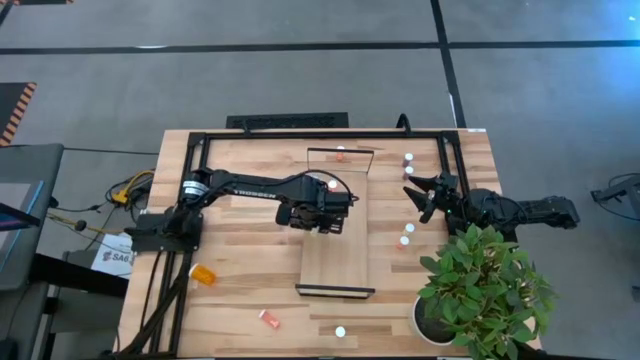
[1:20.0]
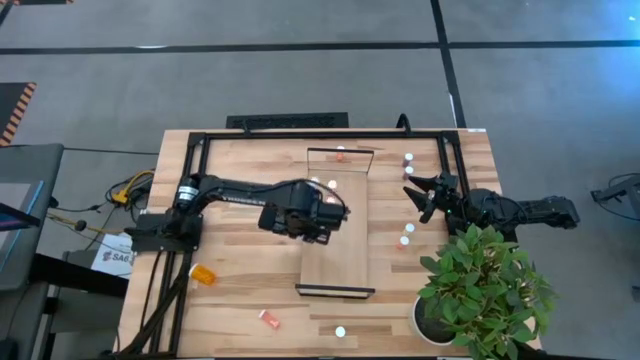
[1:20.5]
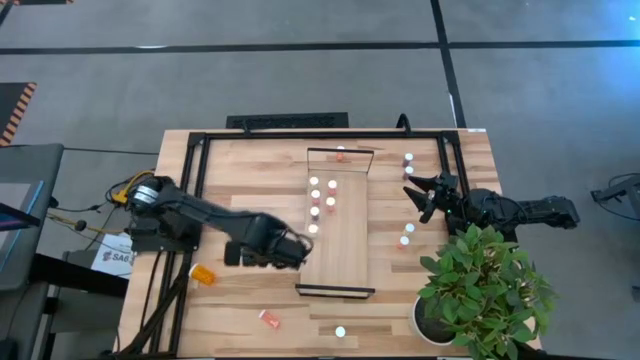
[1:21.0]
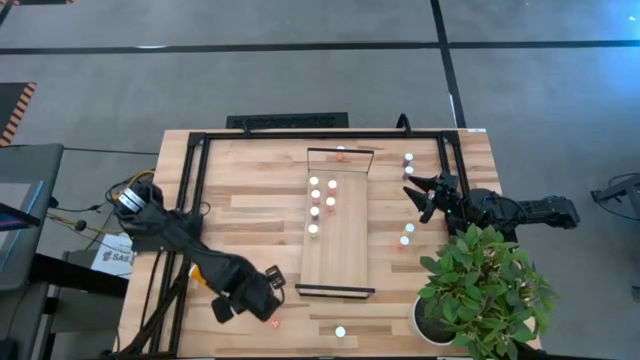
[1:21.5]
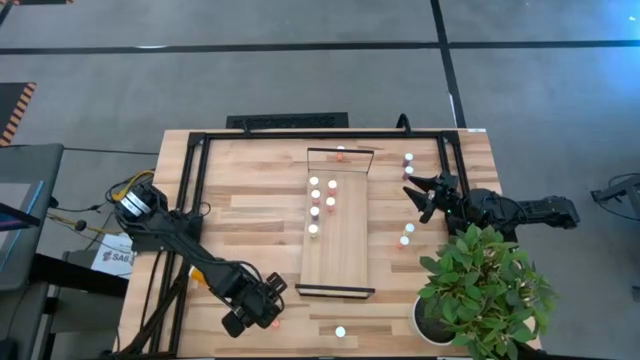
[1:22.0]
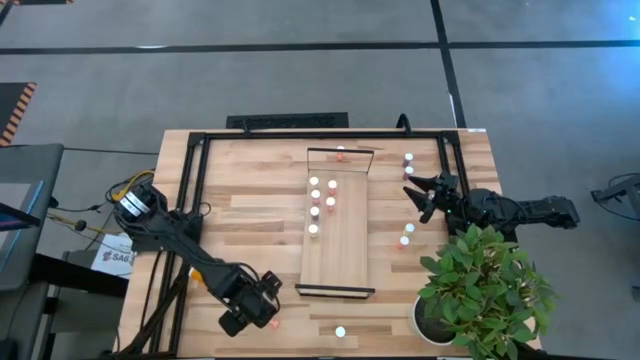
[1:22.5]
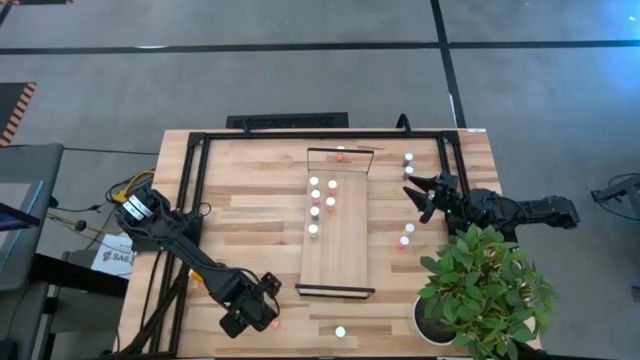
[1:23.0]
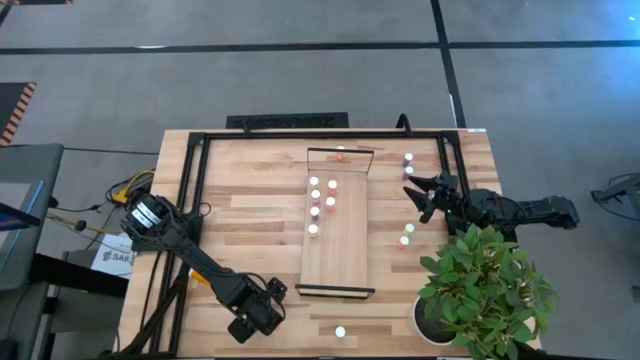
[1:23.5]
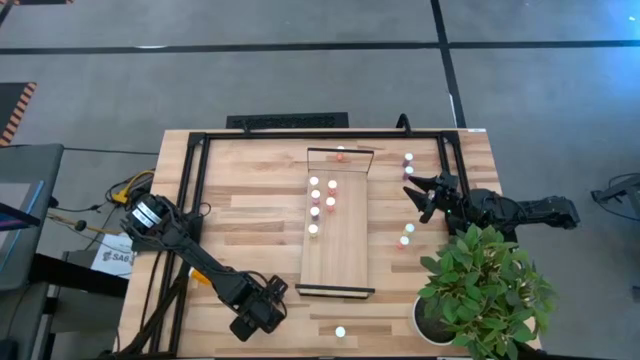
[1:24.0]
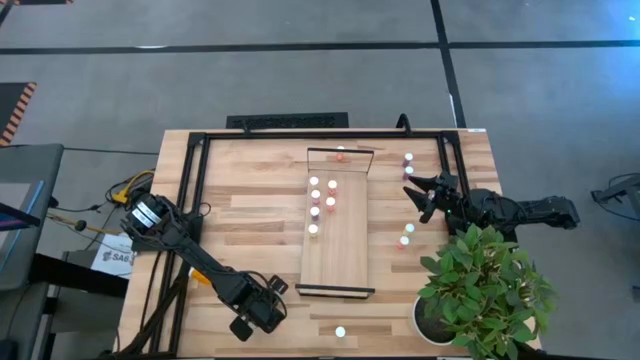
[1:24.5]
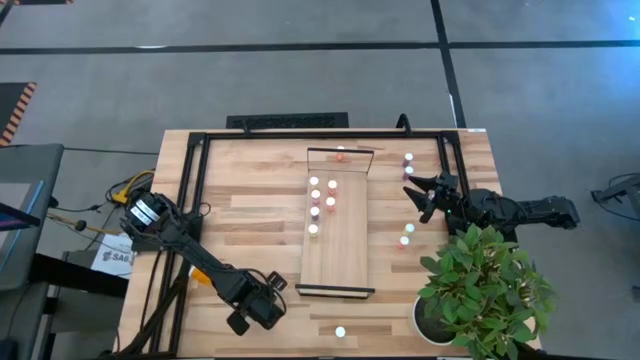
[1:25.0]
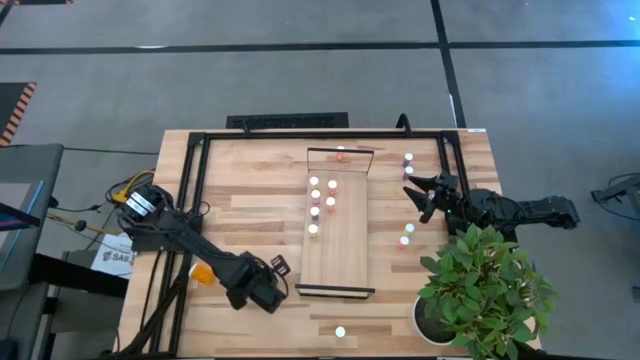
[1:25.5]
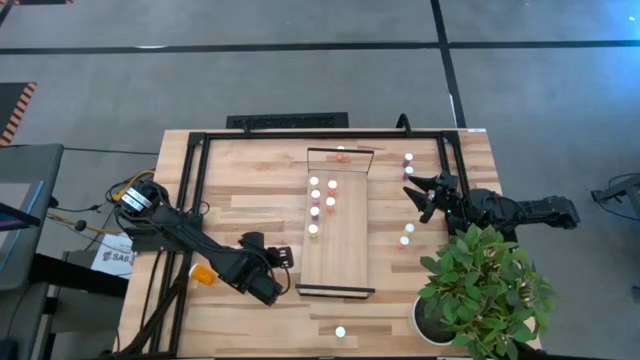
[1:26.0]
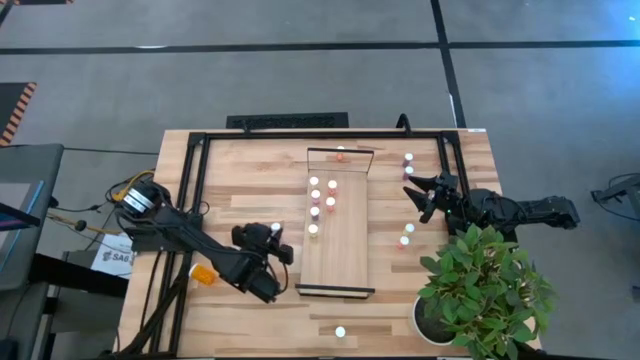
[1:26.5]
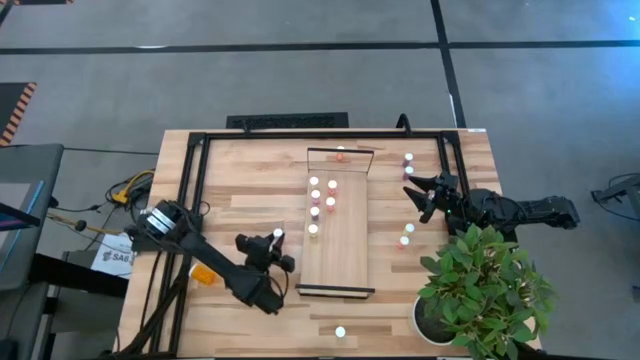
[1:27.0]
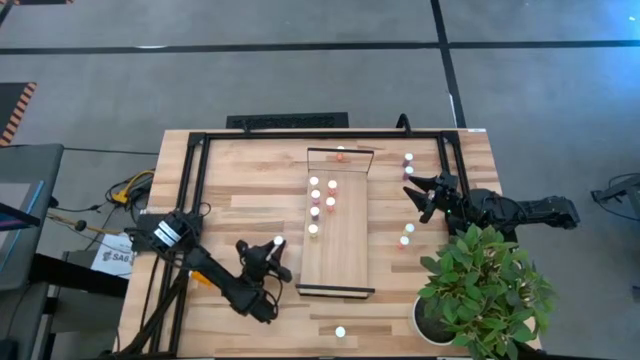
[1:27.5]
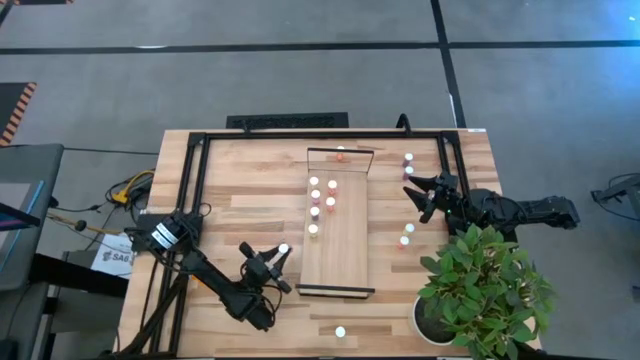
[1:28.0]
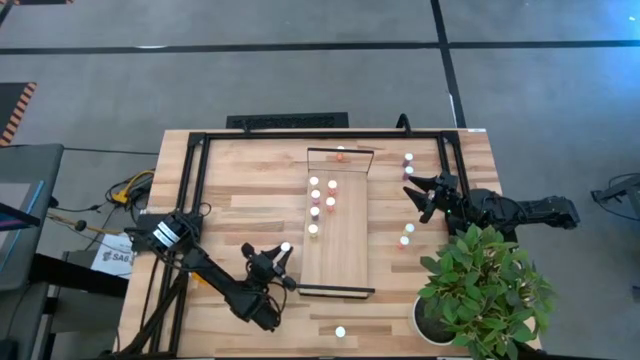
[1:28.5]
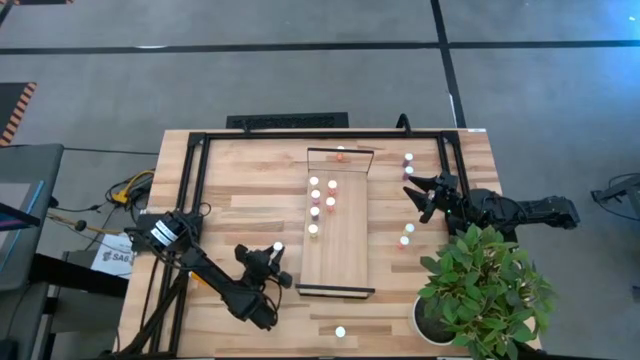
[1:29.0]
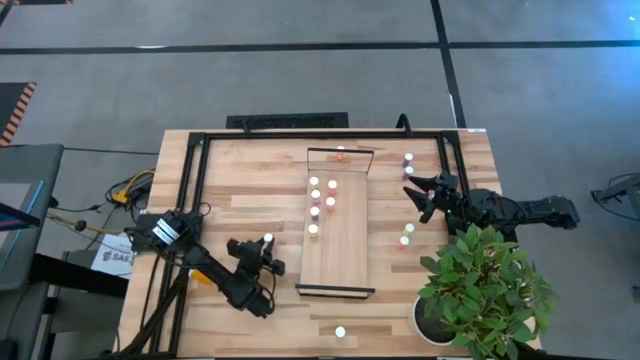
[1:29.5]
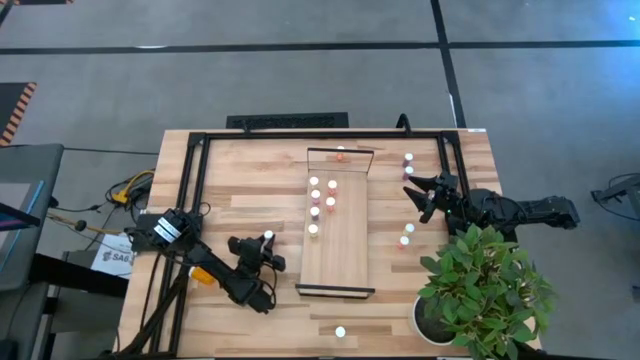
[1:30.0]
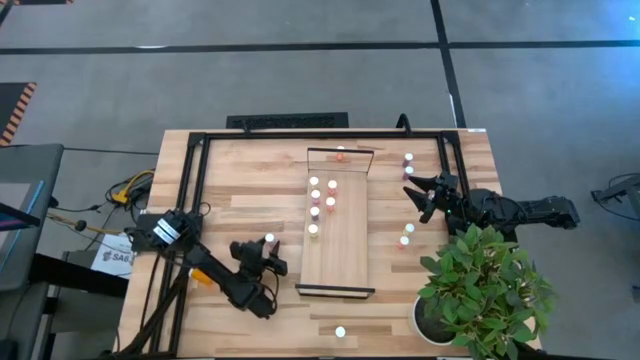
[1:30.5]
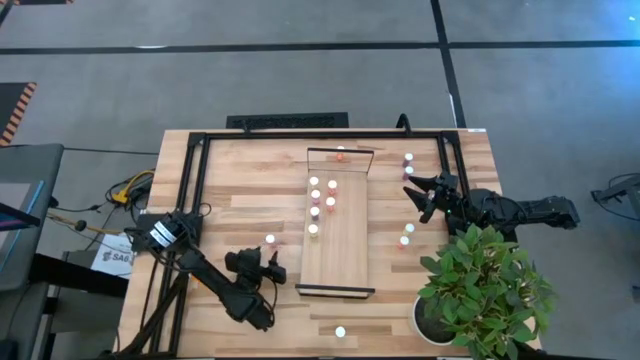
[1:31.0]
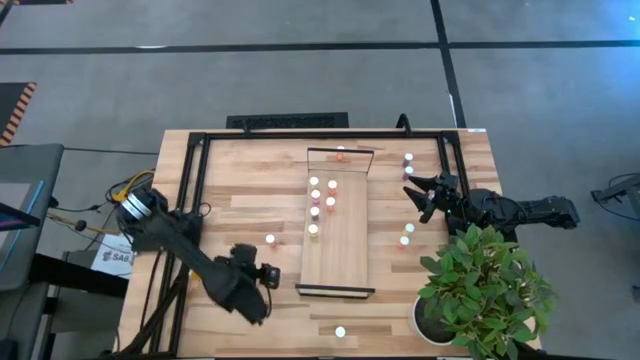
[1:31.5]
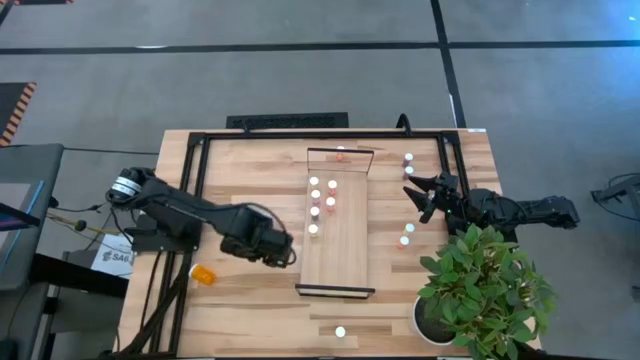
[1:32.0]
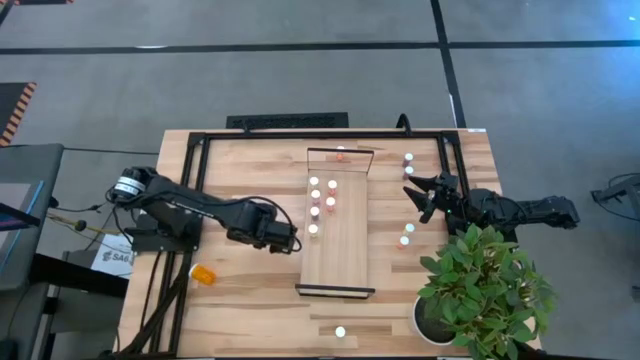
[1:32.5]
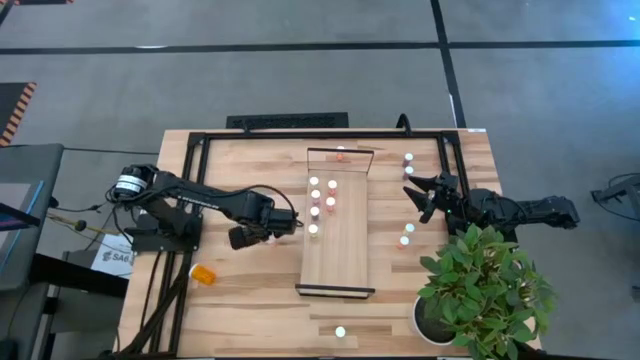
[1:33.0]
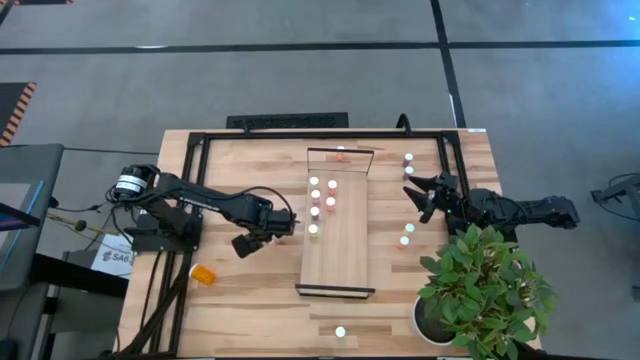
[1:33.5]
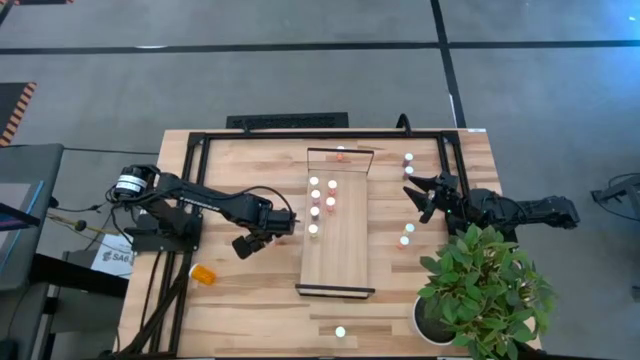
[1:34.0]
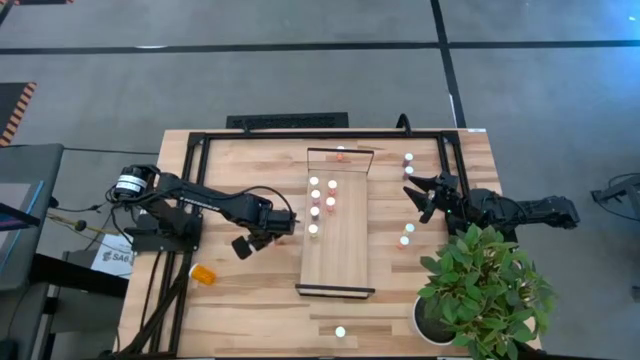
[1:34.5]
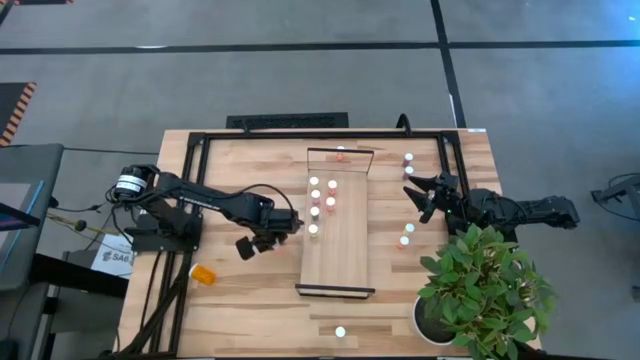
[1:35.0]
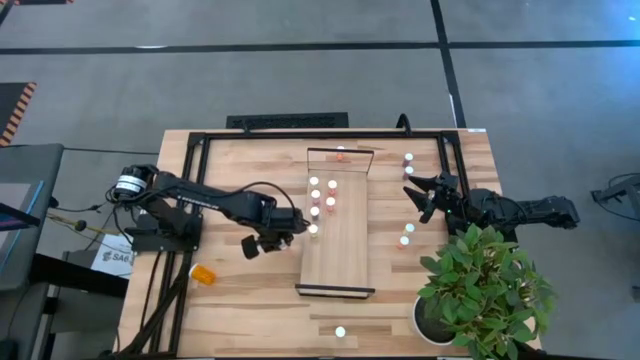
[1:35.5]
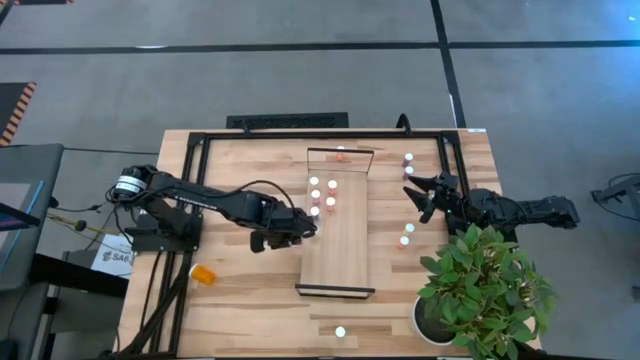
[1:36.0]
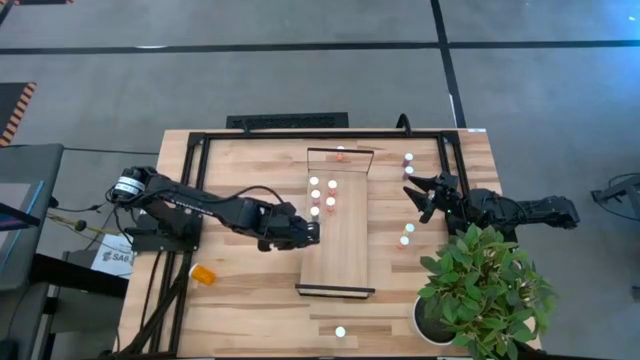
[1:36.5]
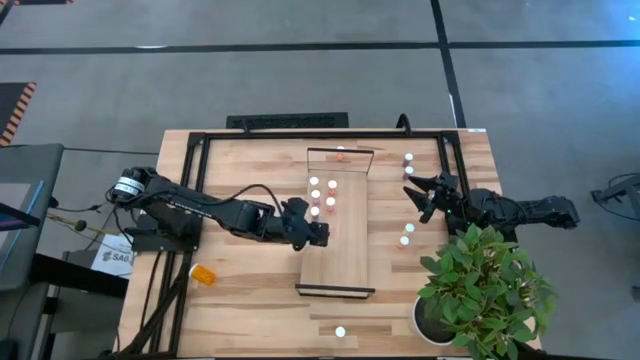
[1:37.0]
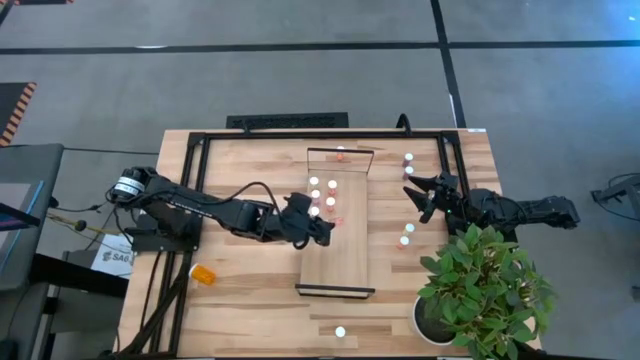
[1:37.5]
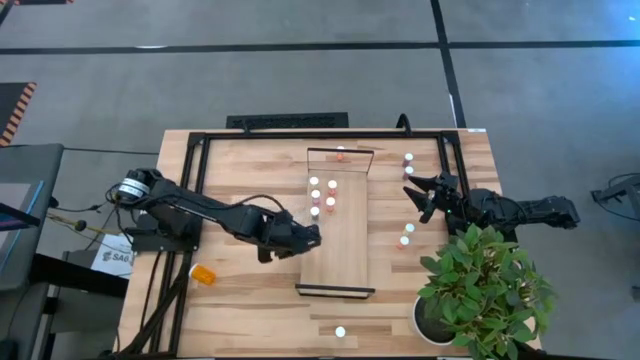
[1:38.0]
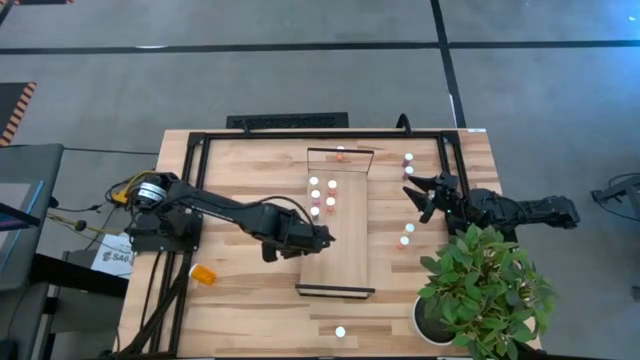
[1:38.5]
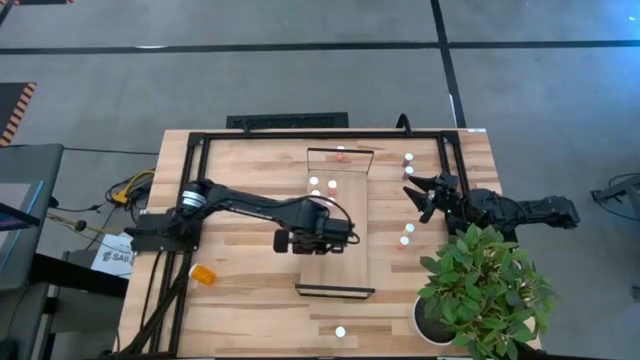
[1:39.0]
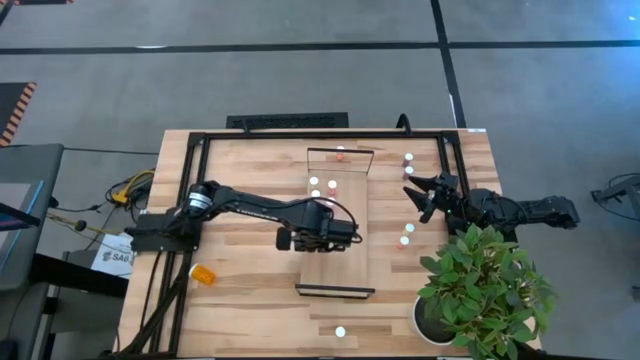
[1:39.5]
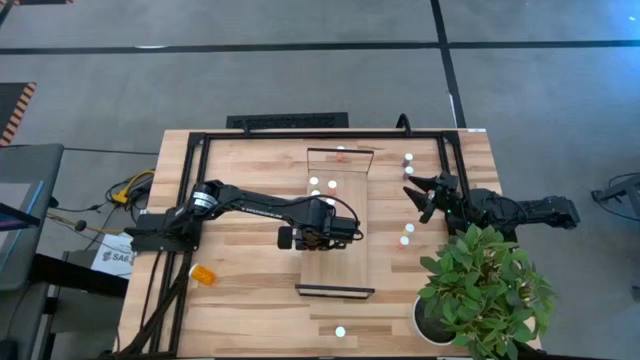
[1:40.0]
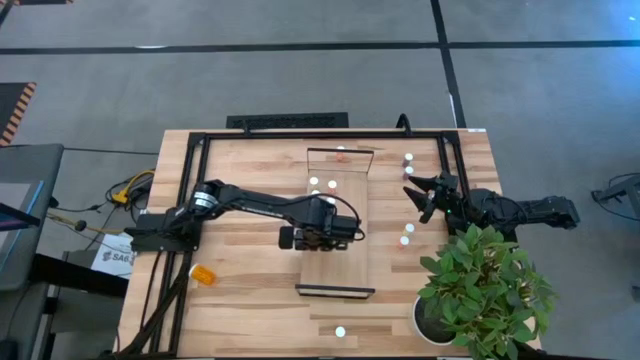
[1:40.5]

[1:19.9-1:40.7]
Task: Pick and place medicine bottles onto shelf by color
Put the pink pill bottle on the shelf

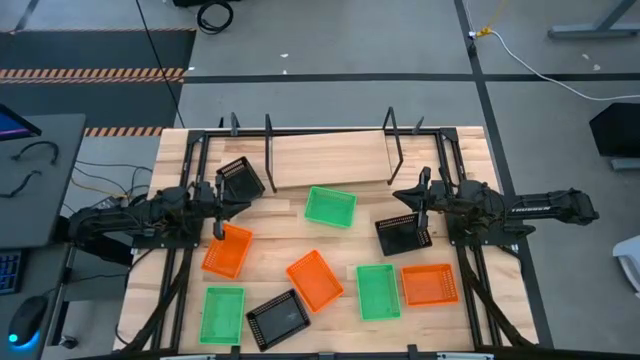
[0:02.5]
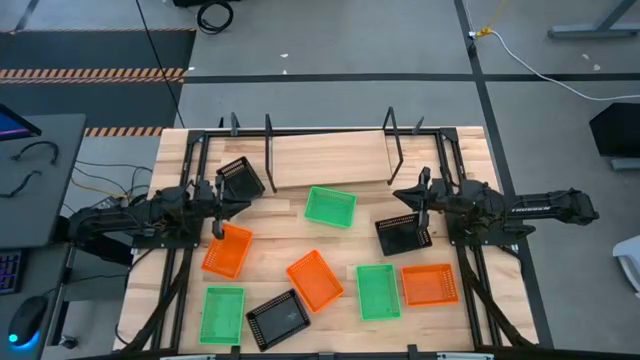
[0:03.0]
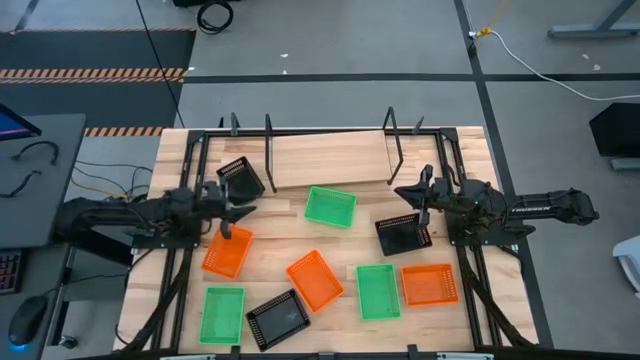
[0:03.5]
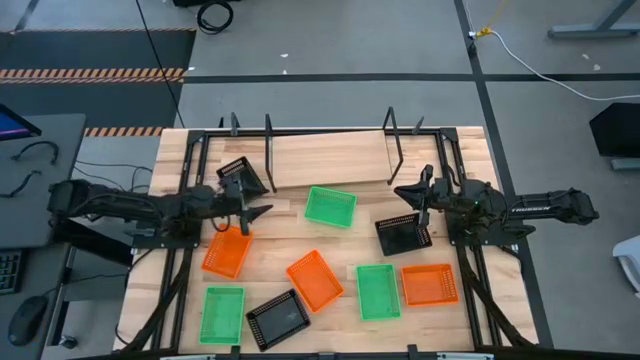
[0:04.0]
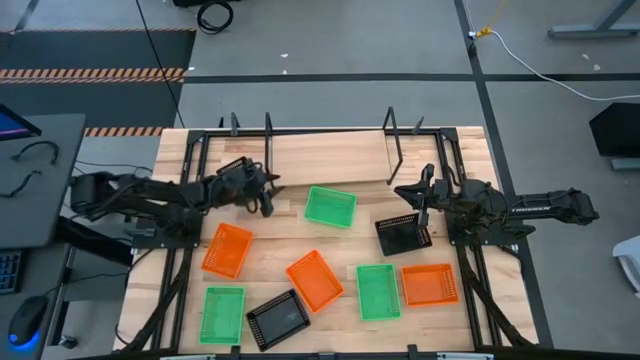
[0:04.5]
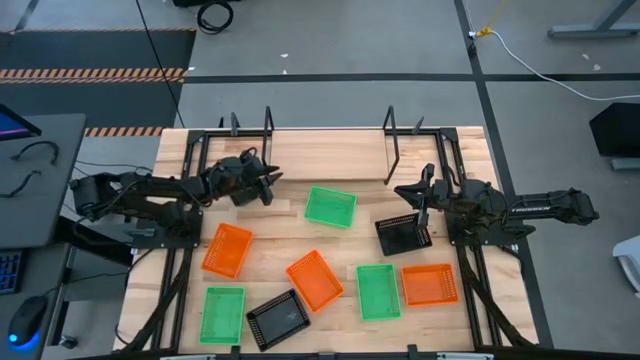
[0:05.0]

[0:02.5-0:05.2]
Task: Stack baskets on shelf by color
Adjust the shelf
